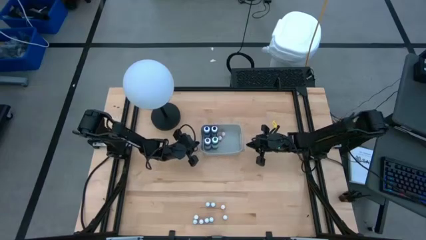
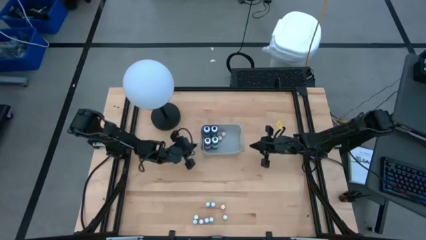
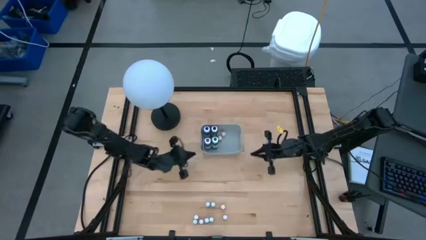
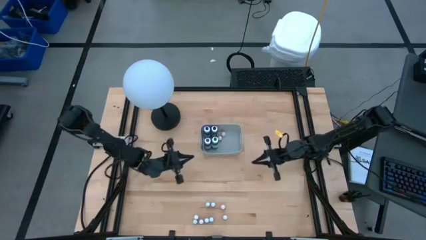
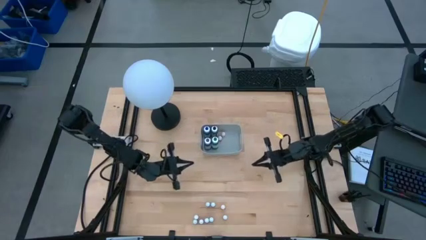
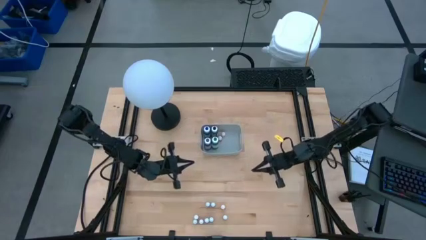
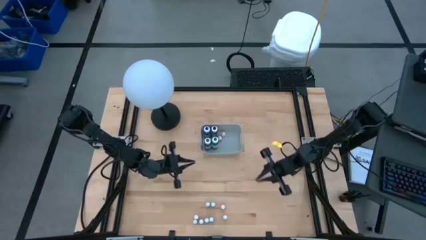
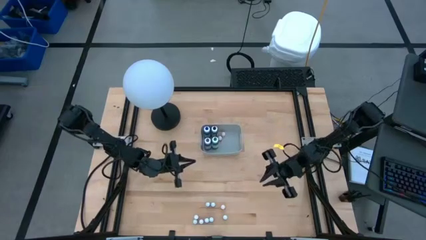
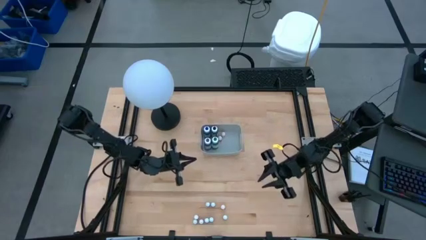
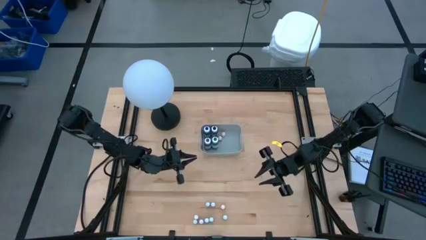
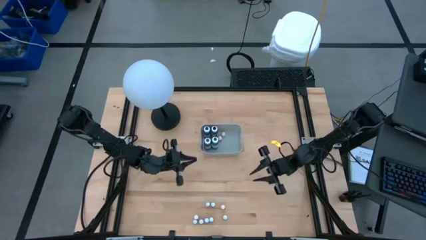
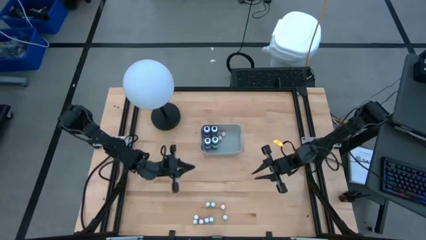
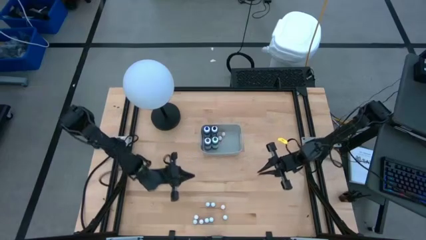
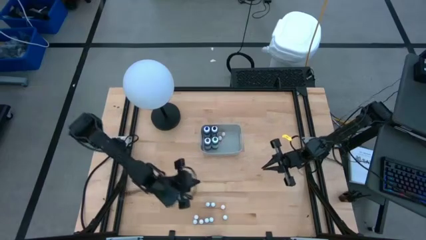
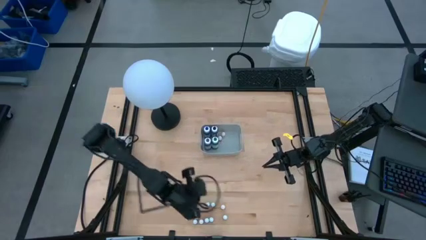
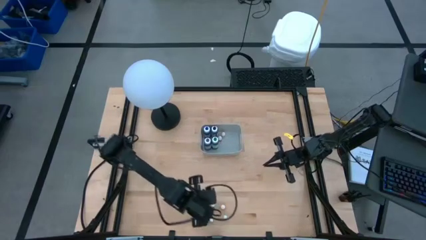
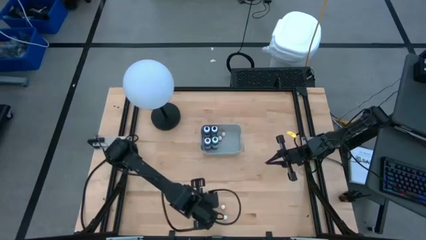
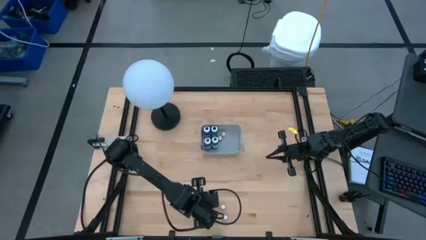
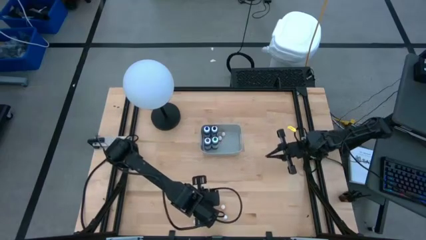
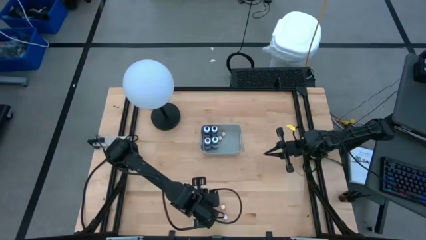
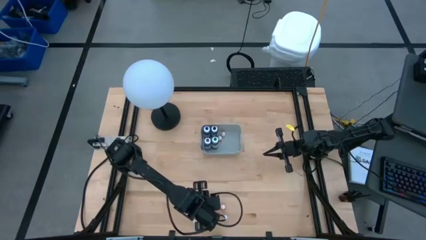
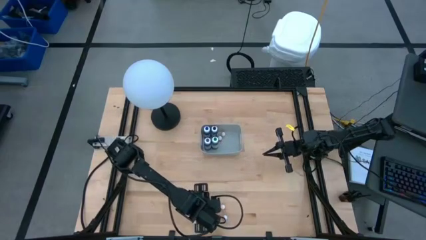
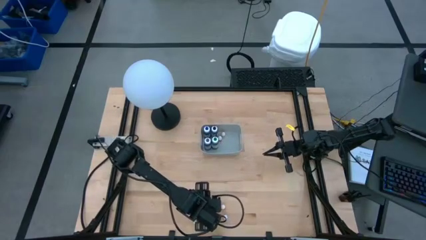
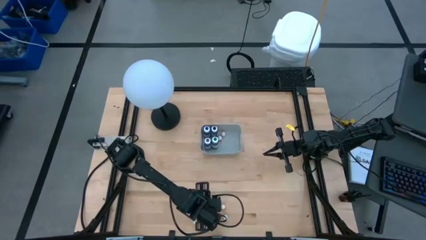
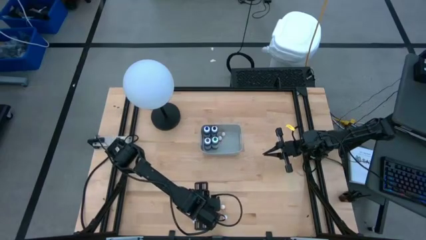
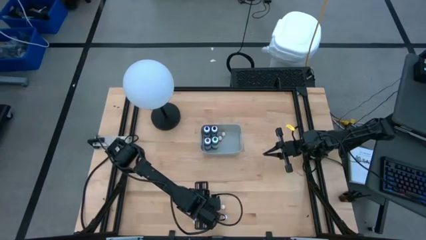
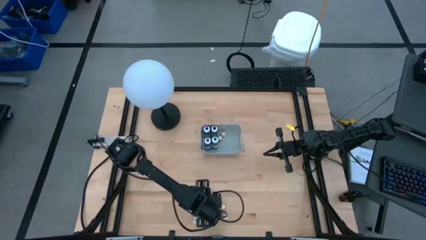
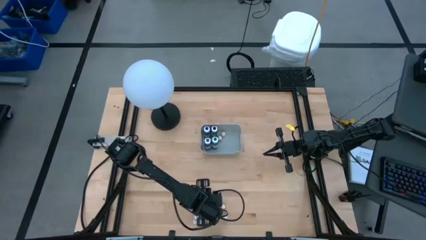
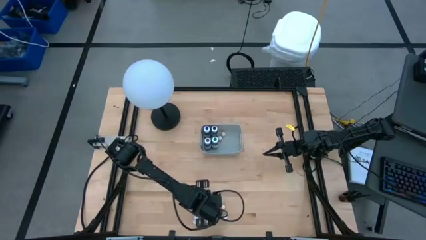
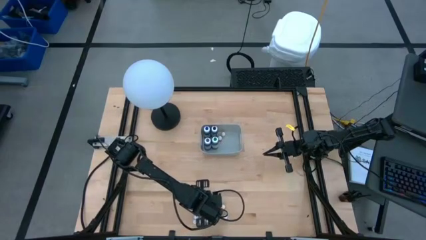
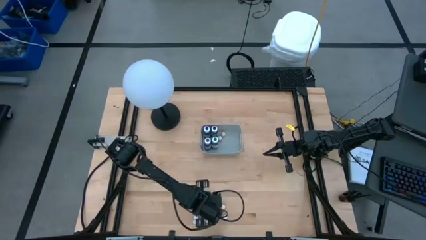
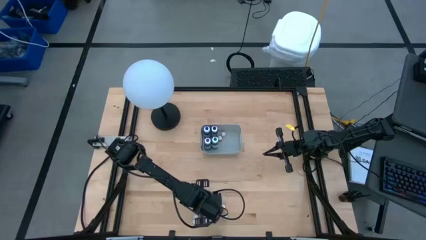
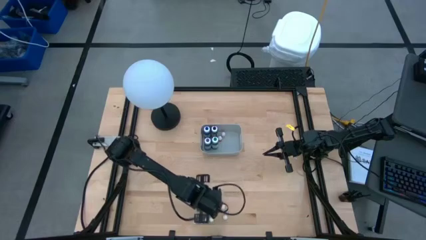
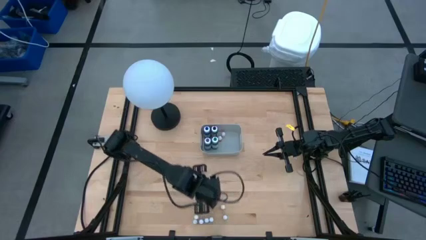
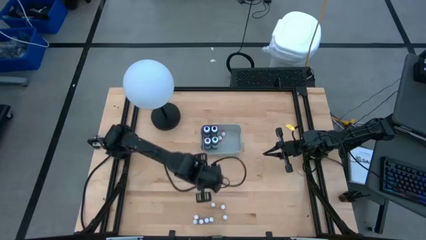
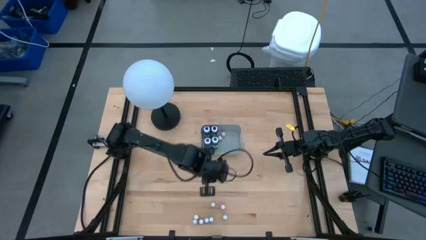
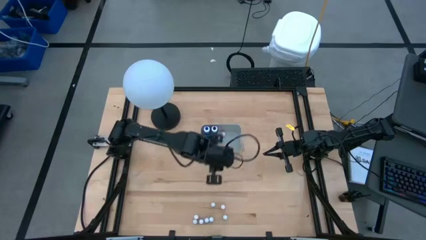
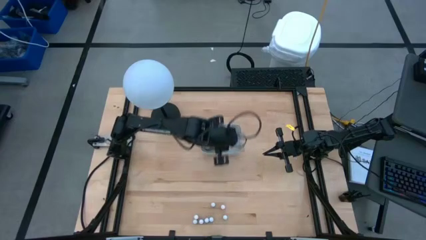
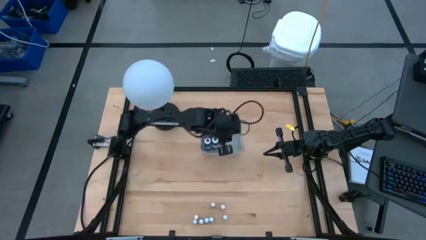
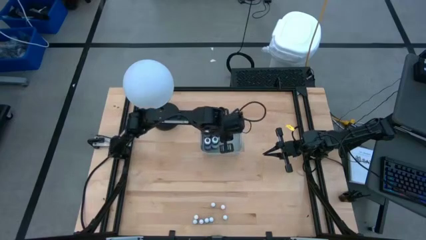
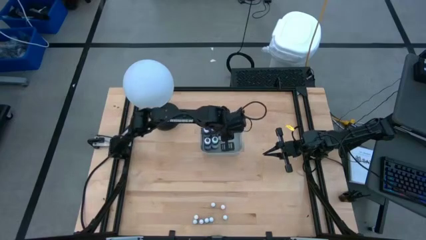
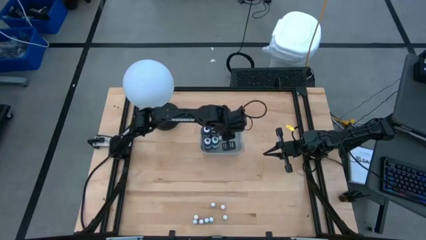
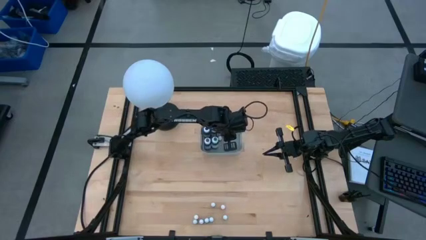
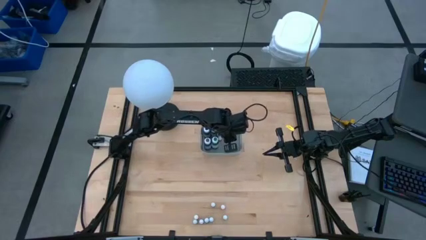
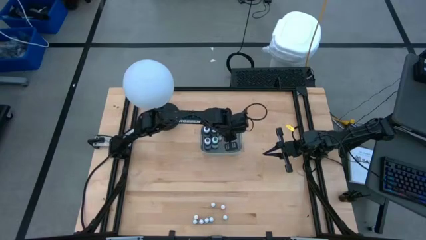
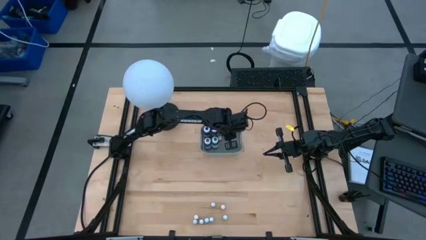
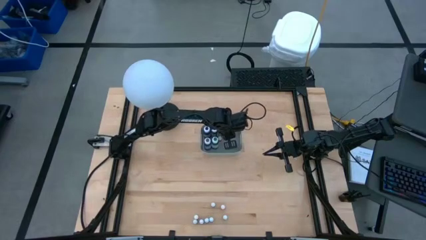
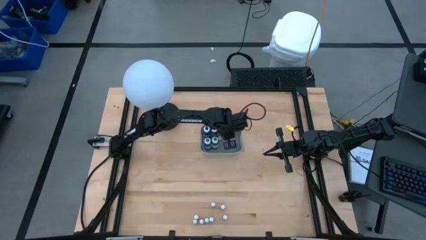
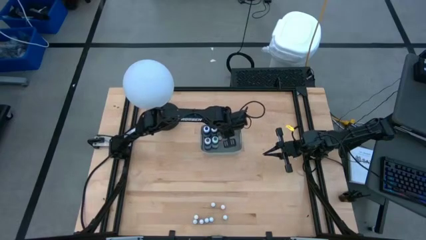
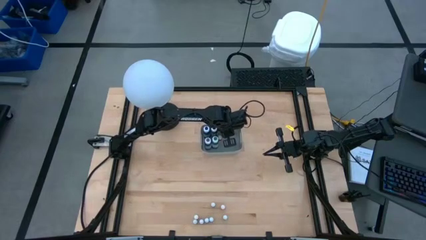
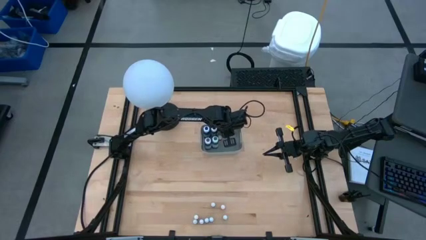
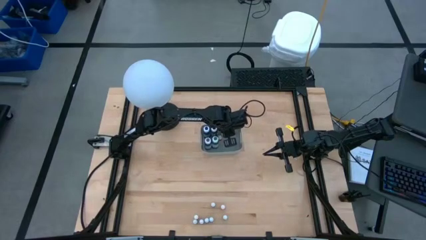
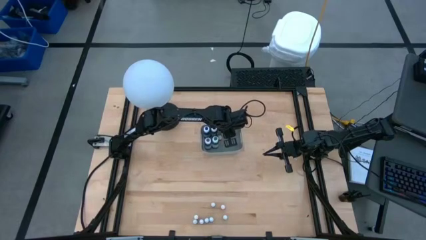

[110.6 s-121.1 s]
Task: Pick & Place food coloring
Put the top small black food coloring bottle into the gray bin

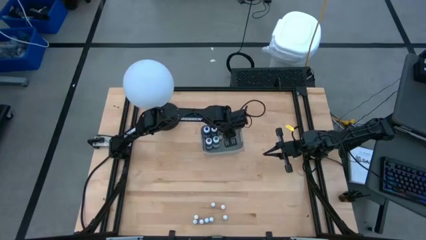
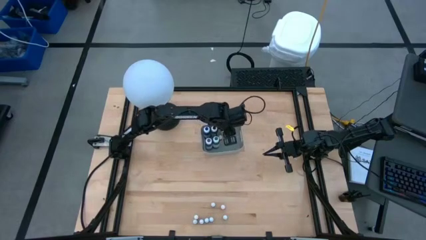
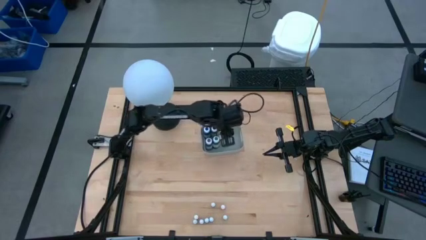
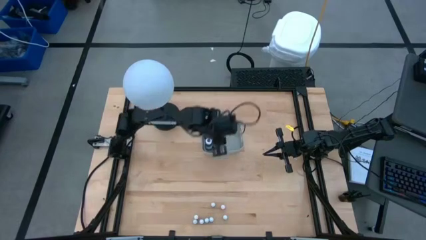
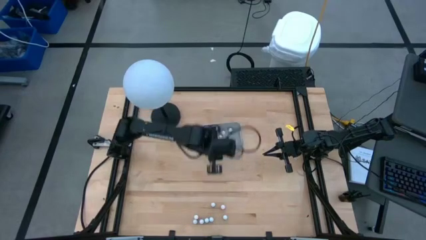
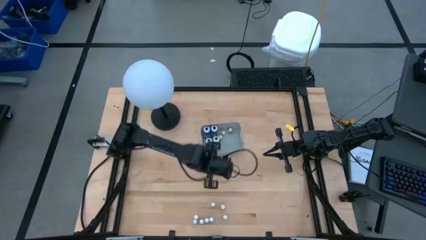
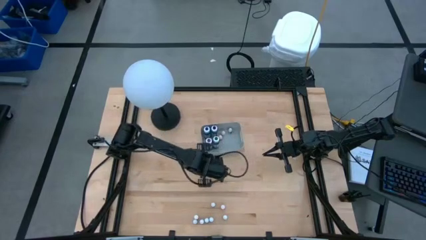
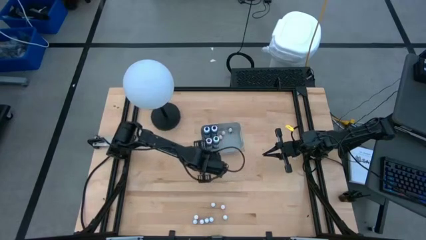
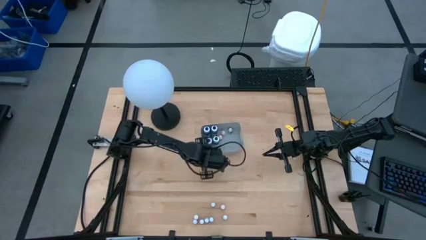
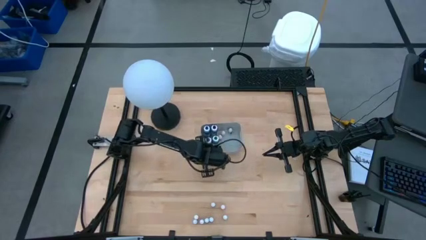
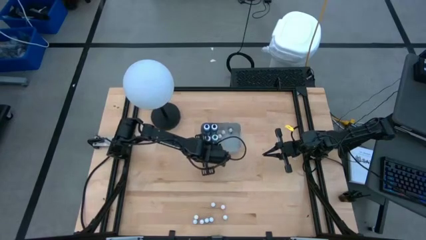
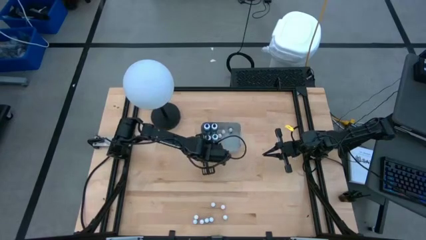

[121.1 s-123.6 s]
Adjust the gray bin

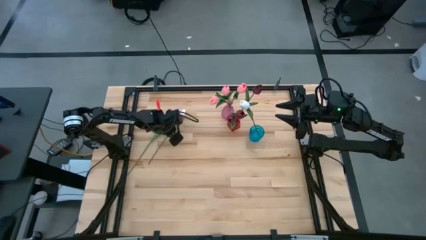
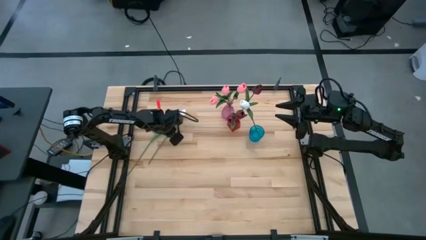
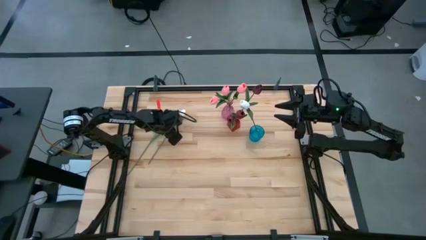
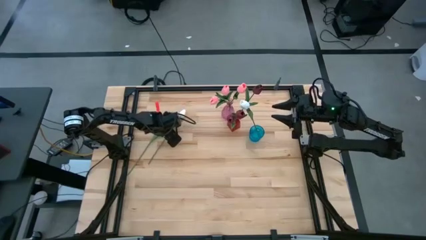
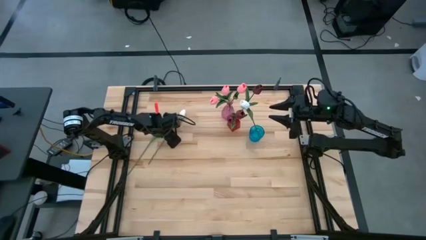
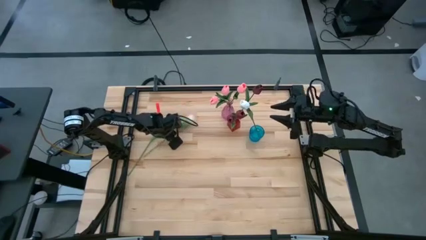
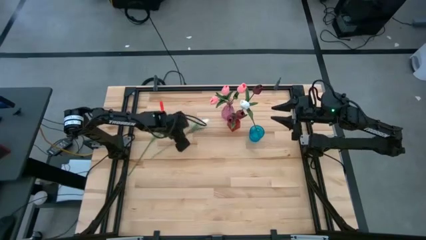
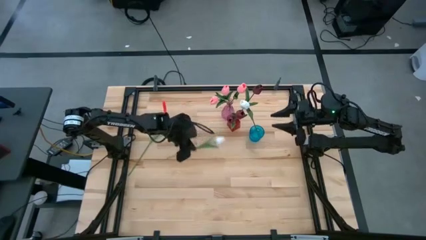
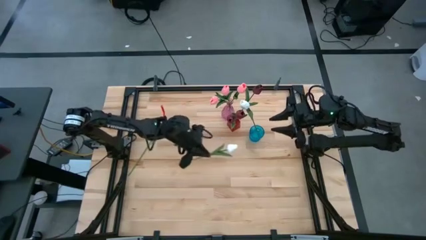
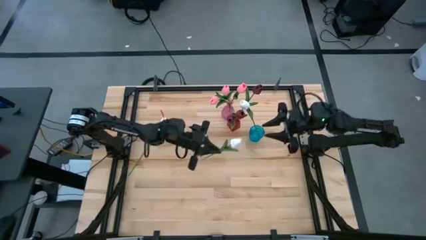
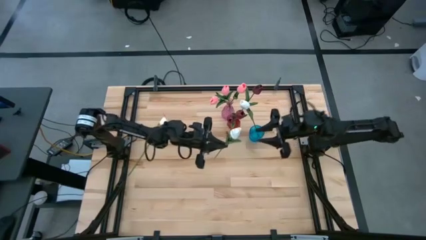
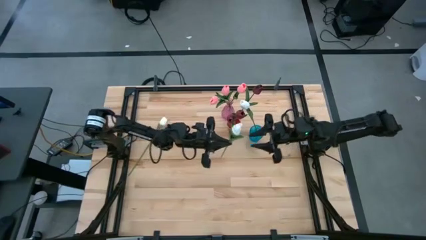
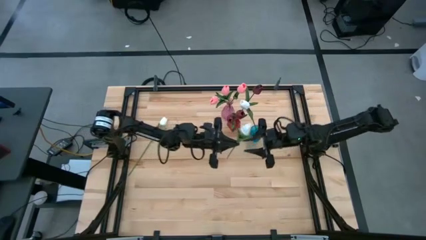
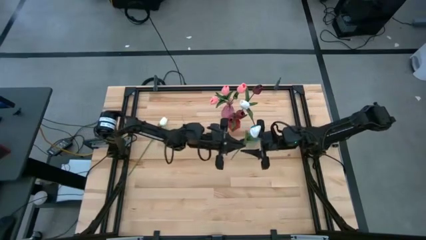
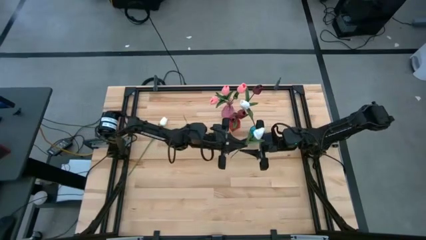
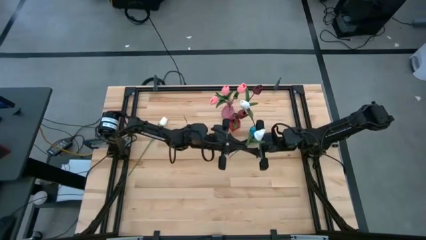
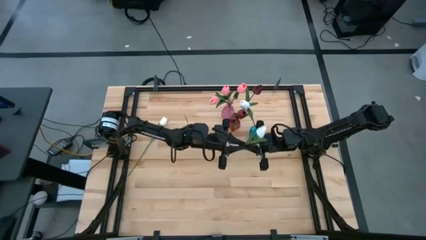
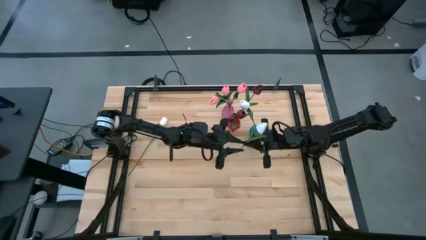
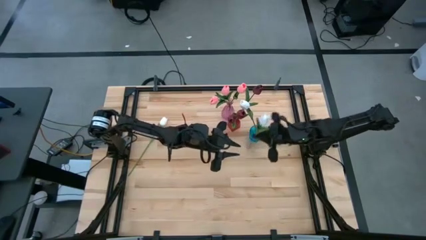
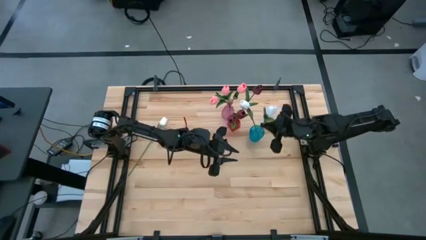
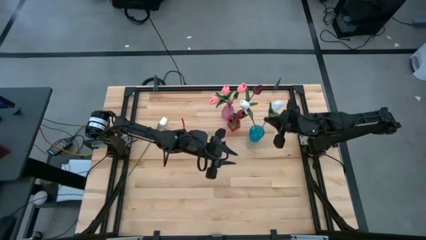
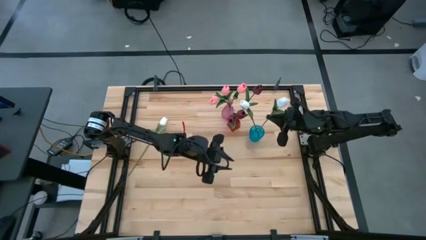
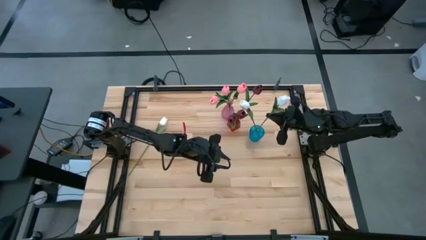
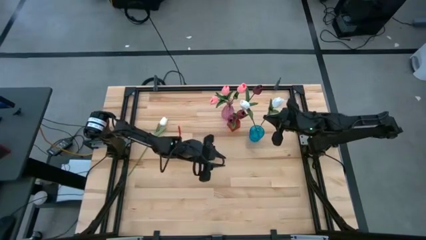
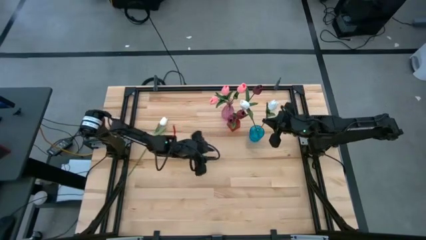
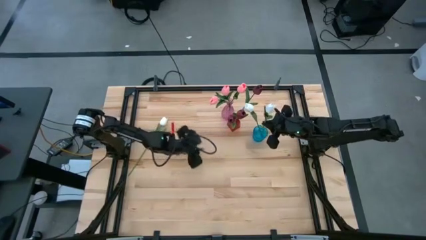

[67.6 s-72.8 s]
Task: Sort flowers into vase by color
Put the white flower into the blue vase
